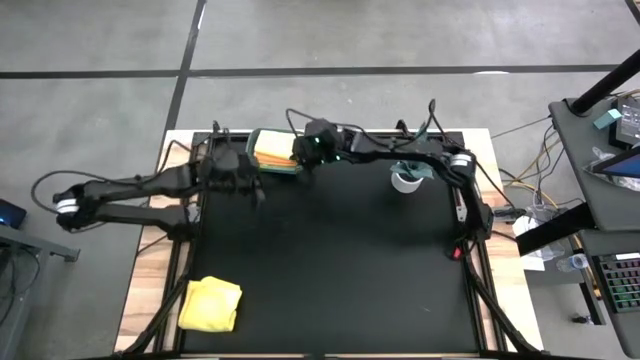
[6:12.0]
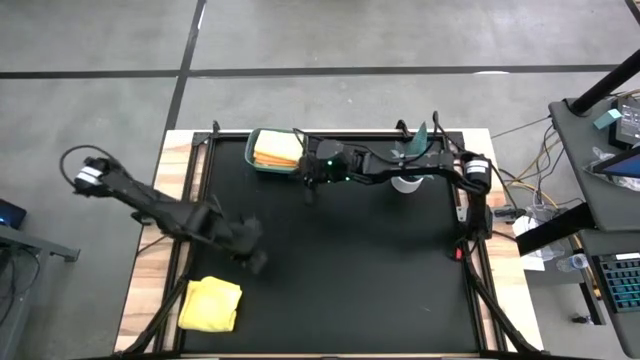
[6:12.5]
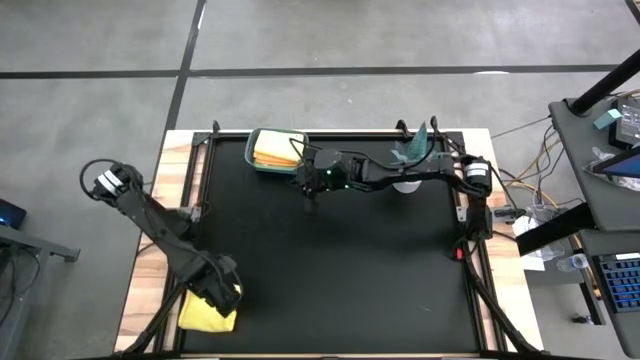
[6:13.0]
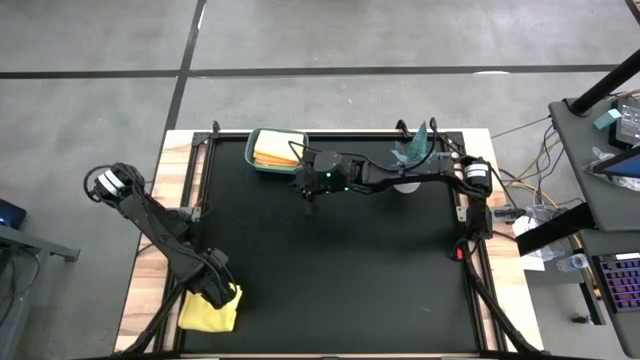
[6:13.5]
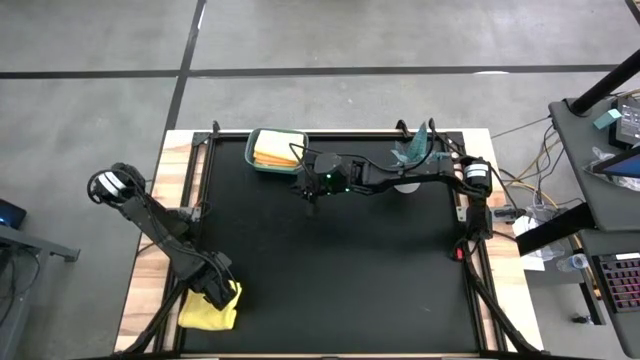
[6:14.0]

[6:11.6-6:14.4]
Task: Fold microfiber towels
Fold the yellow microfiber cloth

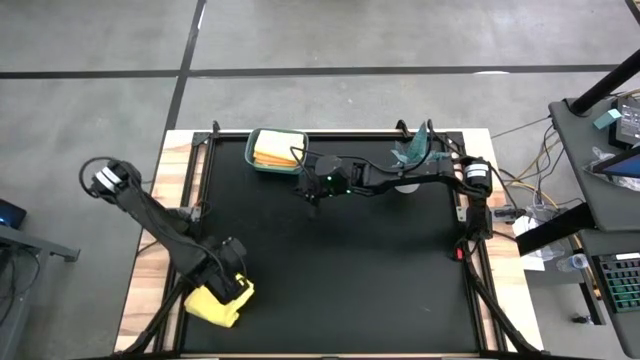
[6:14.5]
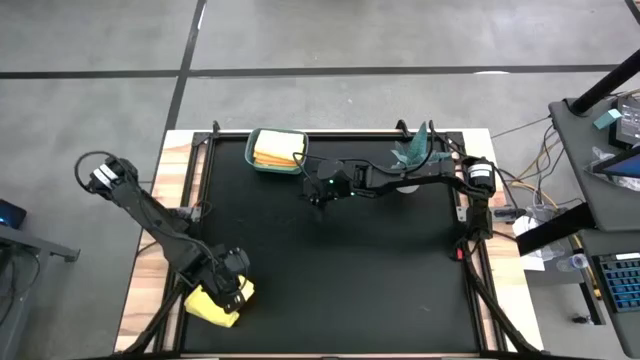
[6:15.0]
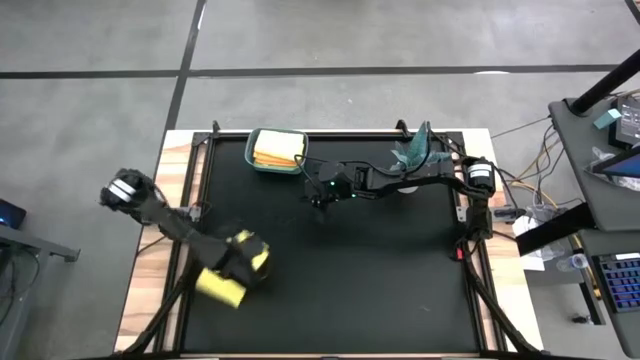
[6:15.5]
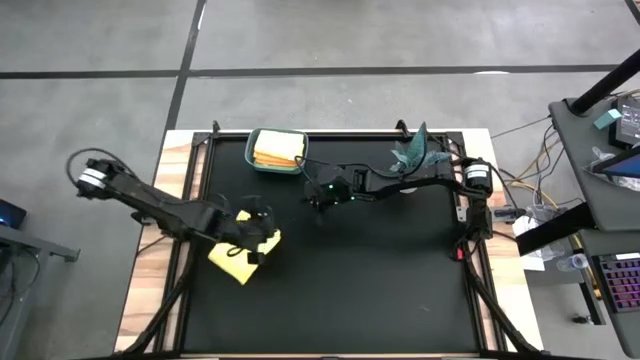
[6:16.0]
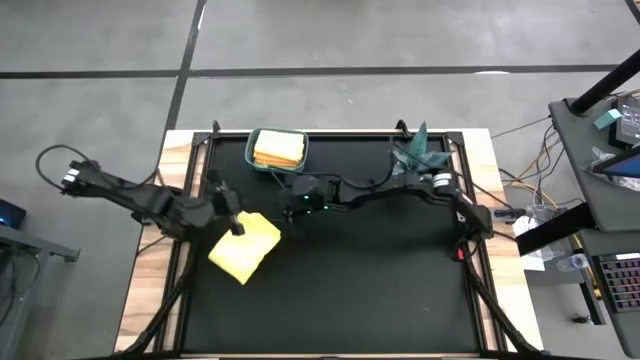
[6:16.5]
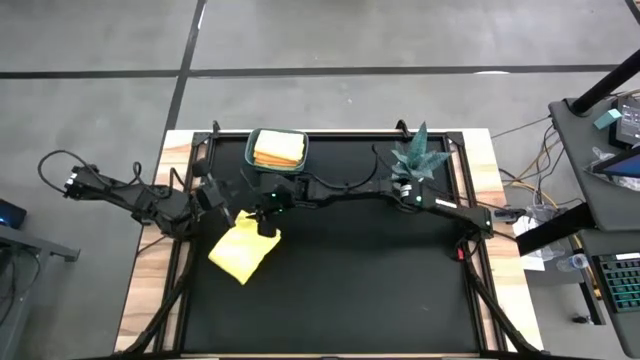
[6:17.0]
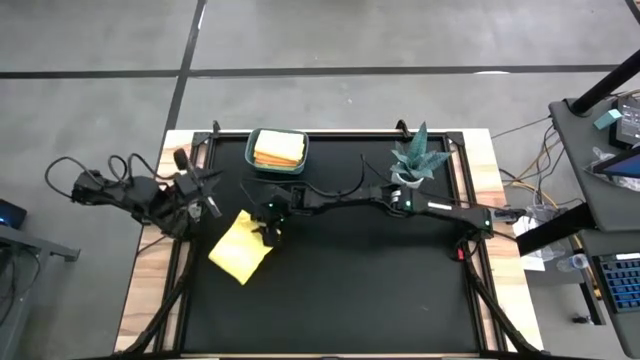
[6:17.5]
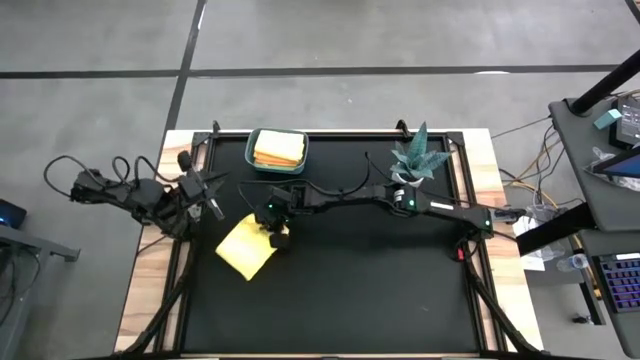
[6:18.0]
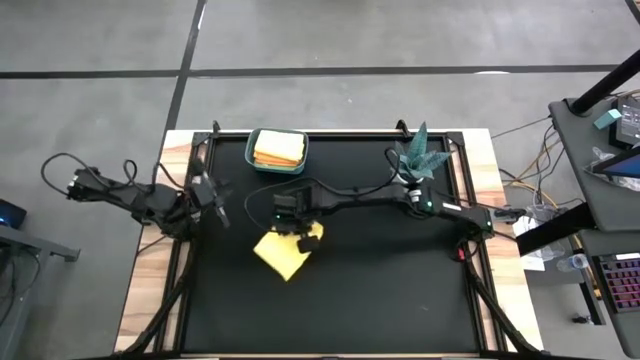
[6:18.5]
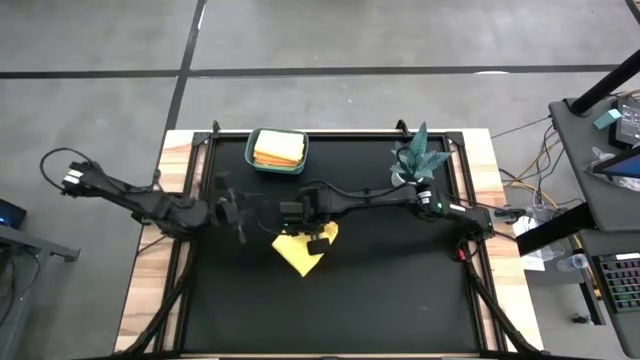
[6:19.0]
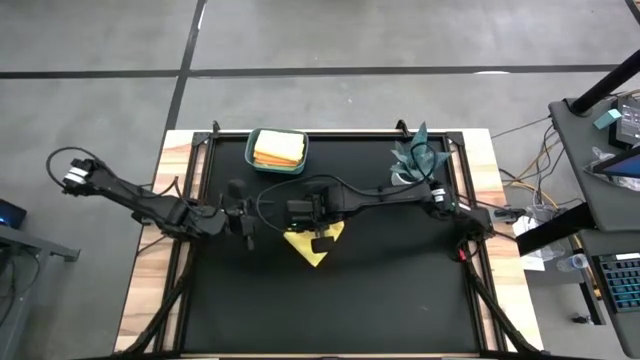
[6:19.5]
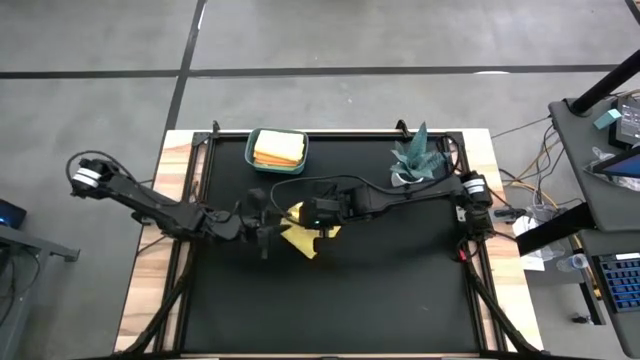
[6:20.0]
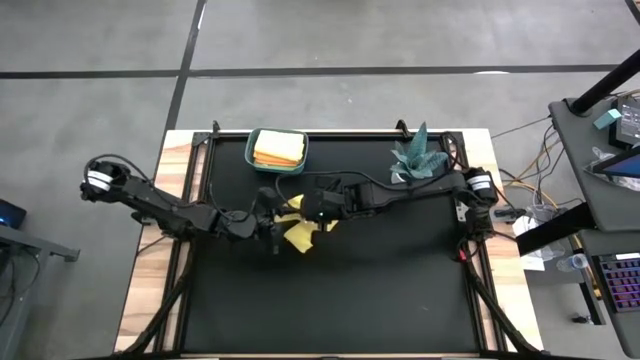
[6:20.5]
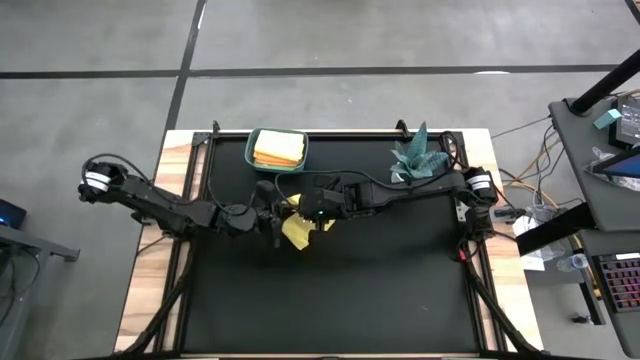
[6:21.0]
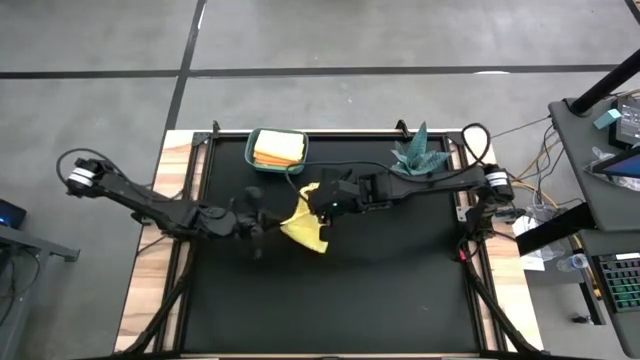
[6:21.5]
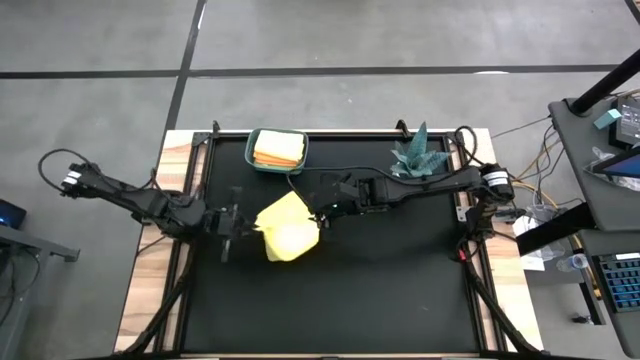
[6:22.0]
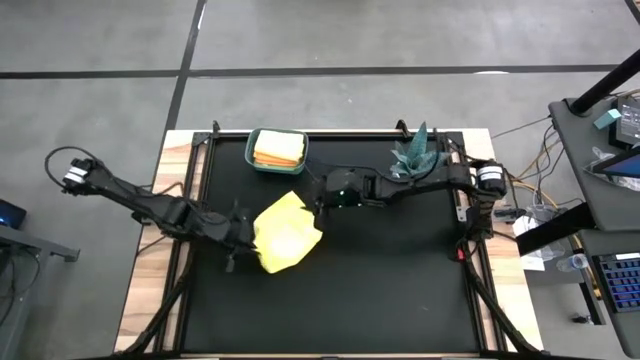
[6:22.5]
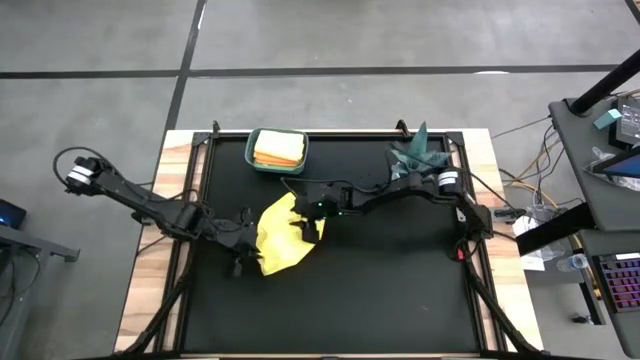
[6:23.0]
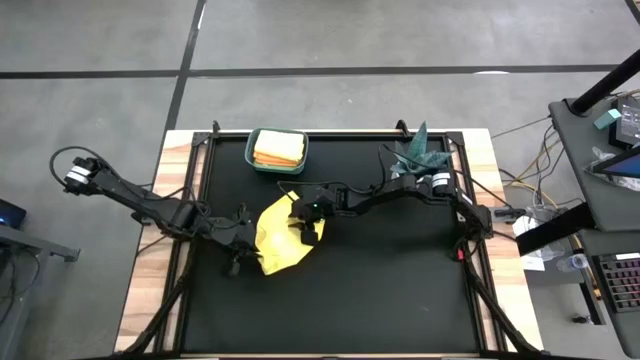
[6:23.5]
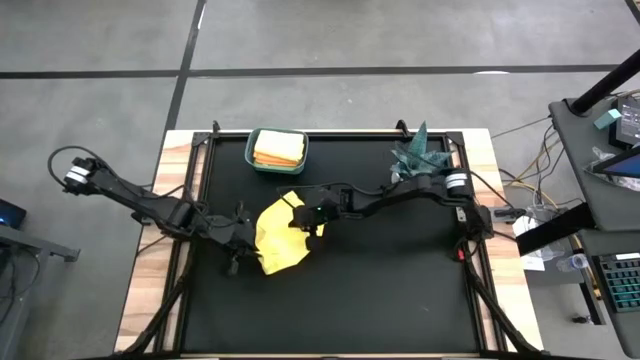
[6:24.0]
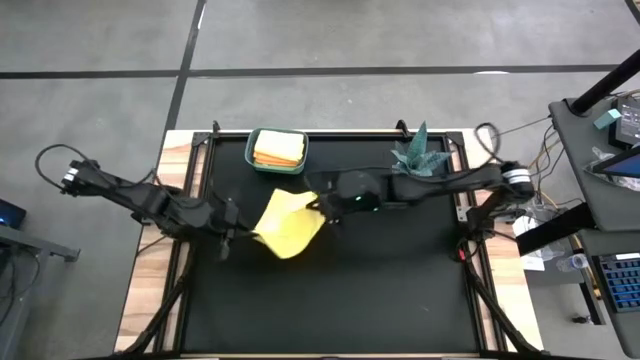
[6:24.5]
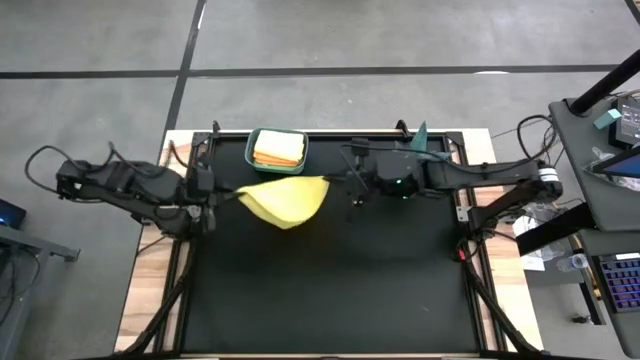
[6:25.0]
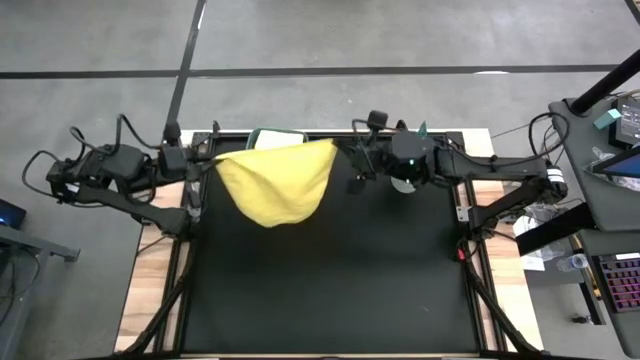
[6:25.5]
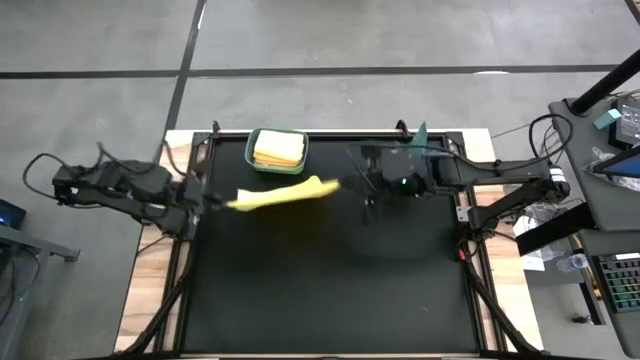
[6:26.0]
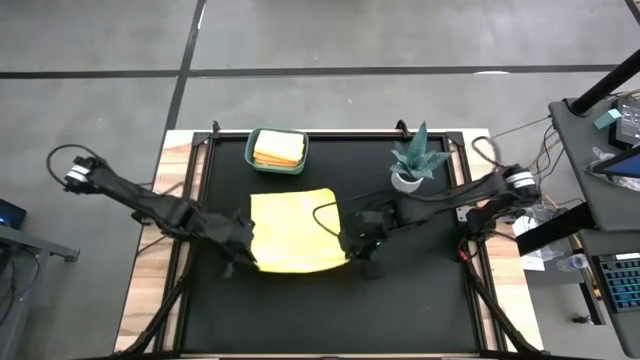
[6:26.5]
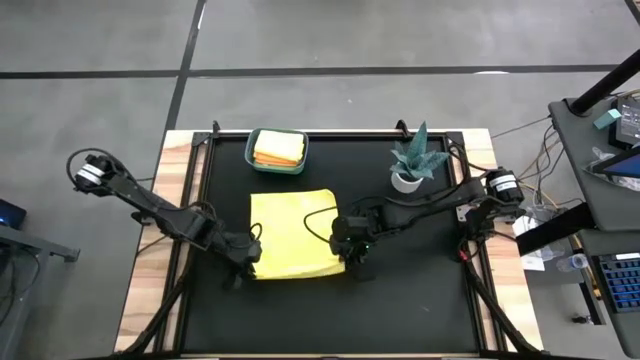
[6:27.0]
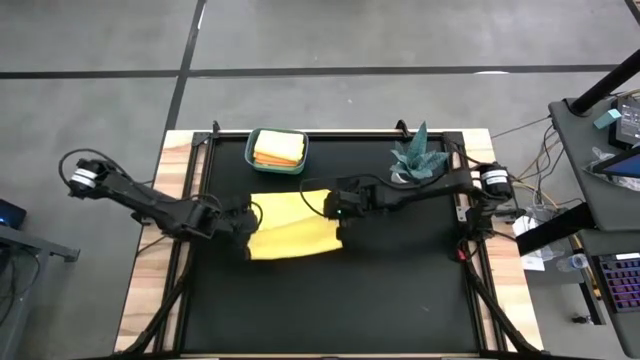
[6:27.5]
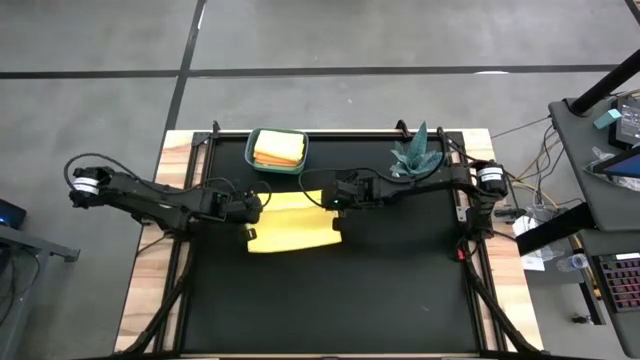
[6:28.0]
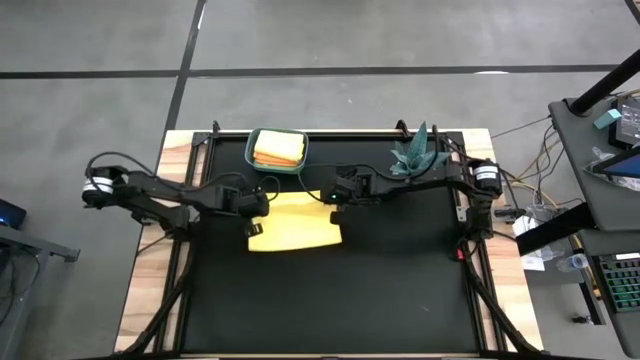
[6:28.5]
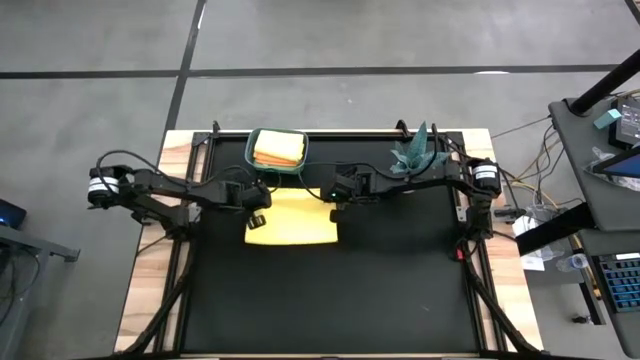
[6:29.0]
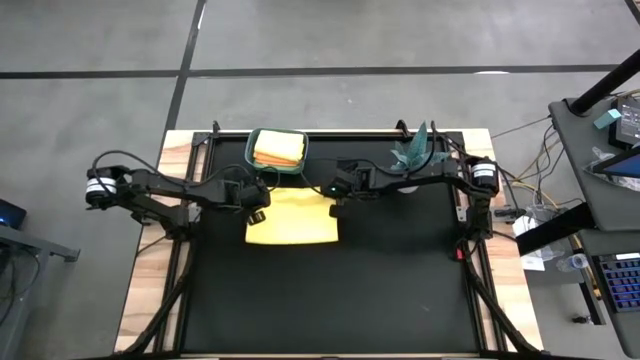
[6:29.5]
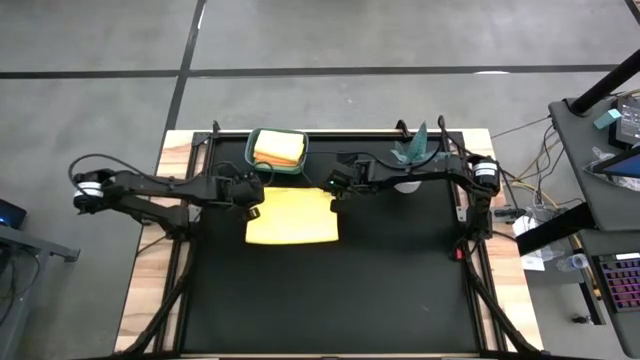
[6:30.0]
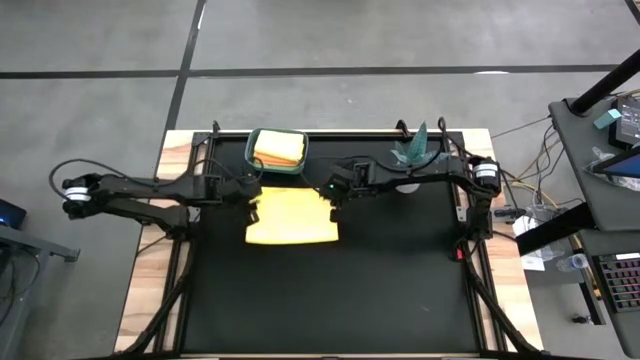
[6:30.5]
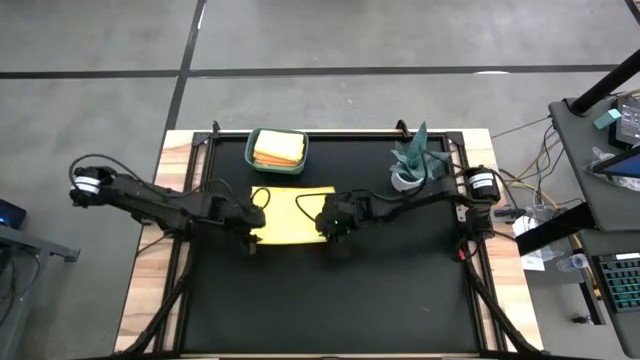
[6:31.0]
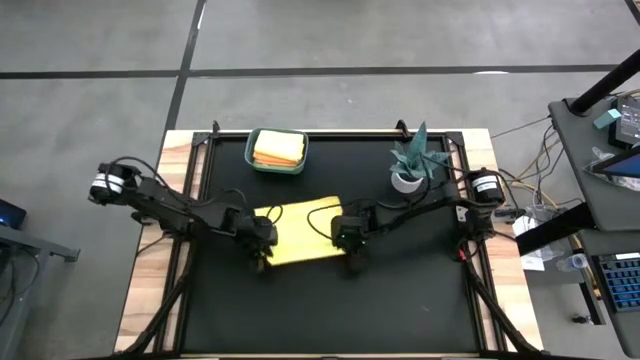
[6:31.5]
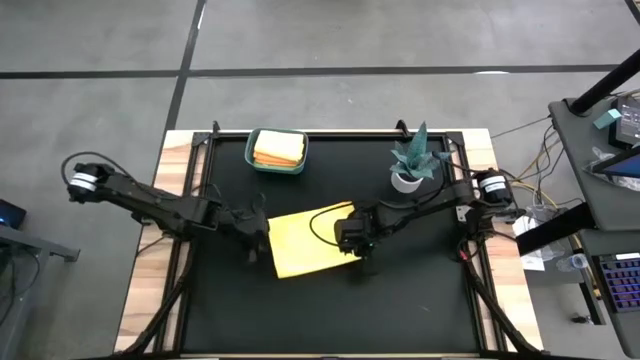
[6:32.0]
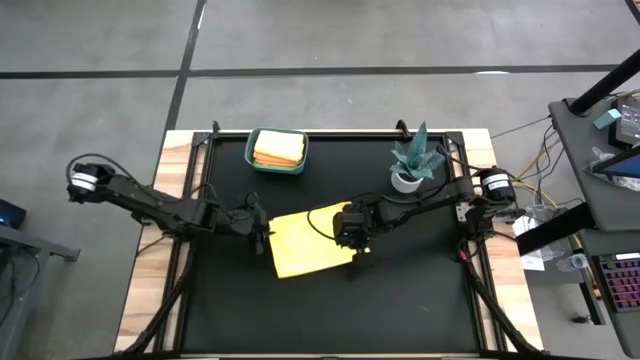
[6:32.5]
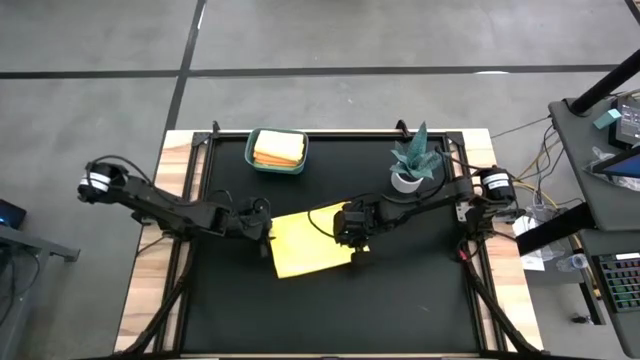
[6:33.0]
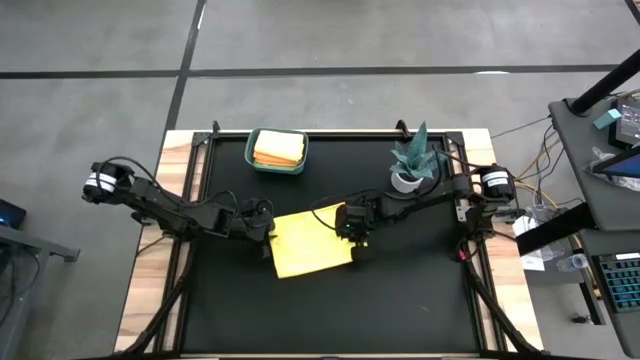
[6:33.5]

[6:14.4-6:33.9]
Fold the yellow microfiber cloth
